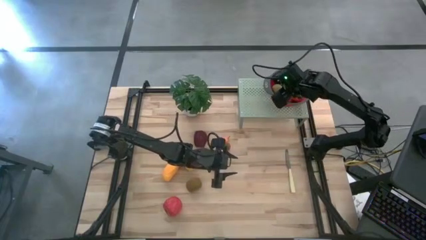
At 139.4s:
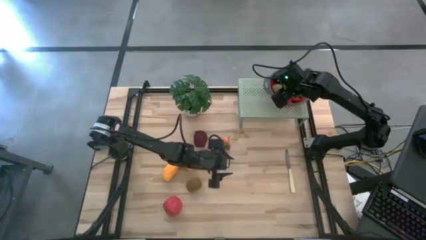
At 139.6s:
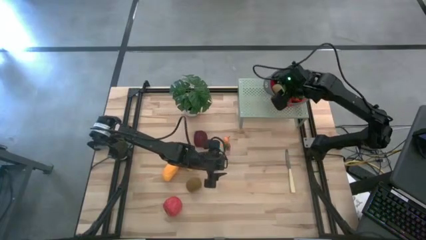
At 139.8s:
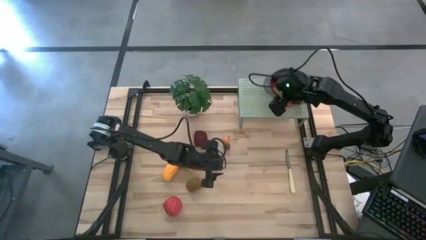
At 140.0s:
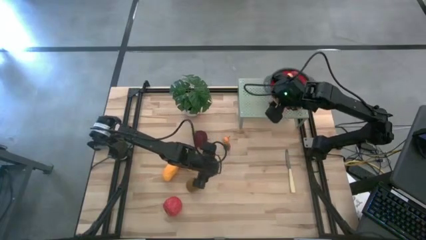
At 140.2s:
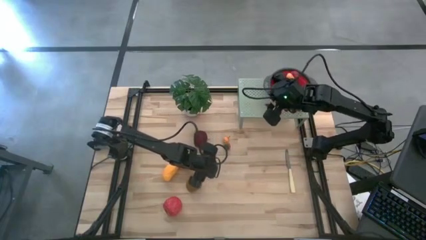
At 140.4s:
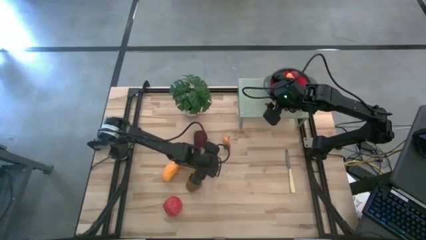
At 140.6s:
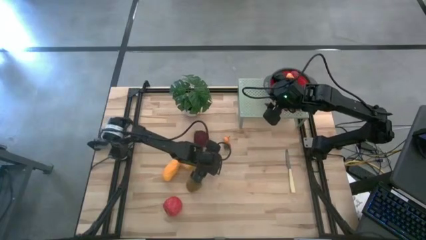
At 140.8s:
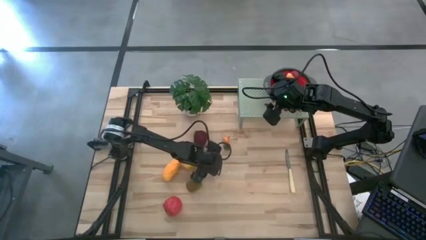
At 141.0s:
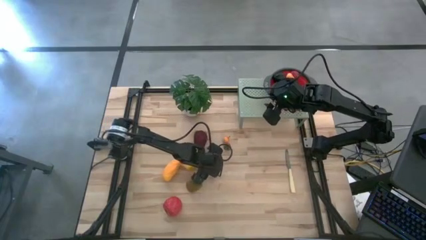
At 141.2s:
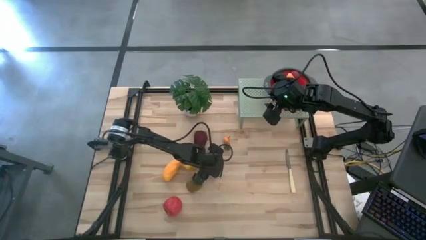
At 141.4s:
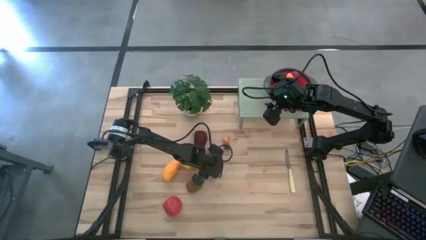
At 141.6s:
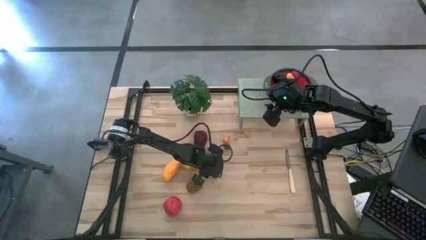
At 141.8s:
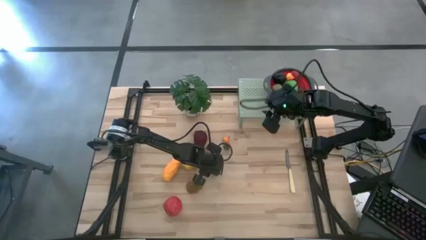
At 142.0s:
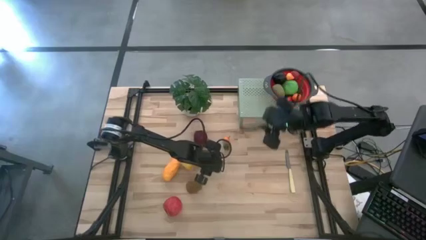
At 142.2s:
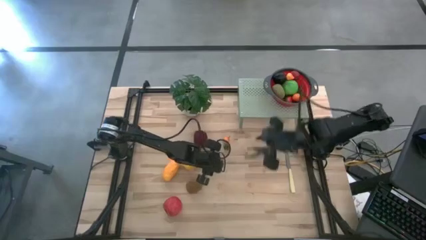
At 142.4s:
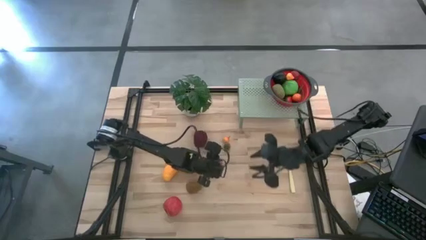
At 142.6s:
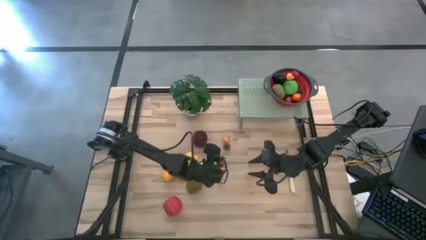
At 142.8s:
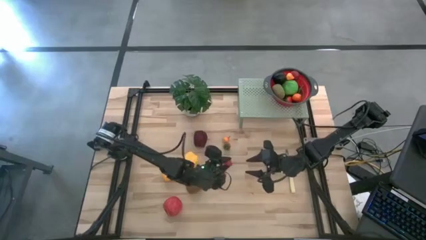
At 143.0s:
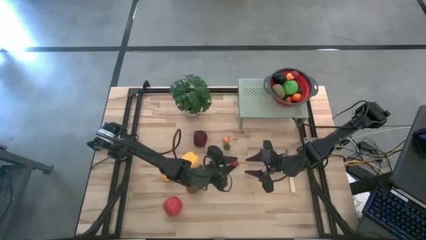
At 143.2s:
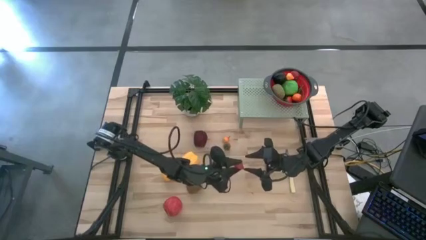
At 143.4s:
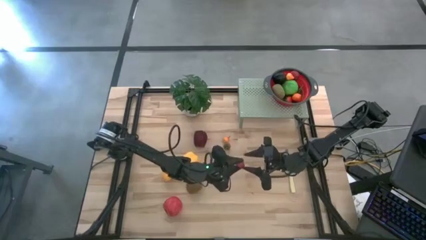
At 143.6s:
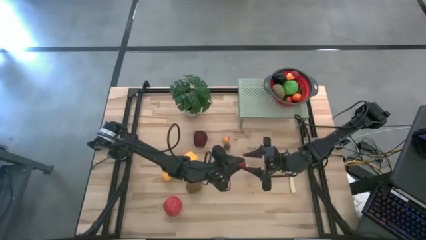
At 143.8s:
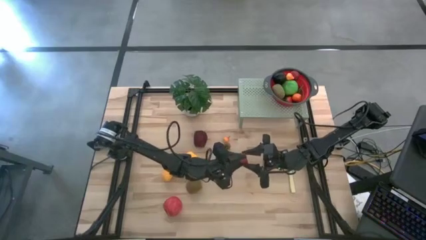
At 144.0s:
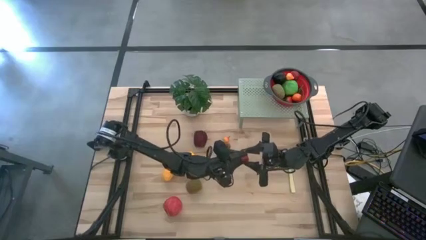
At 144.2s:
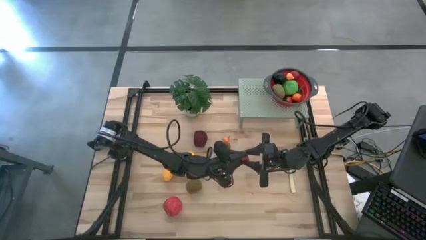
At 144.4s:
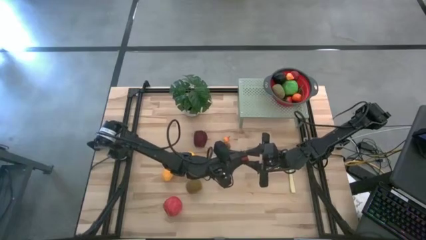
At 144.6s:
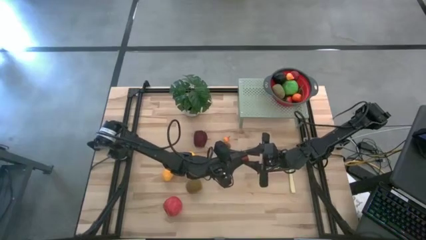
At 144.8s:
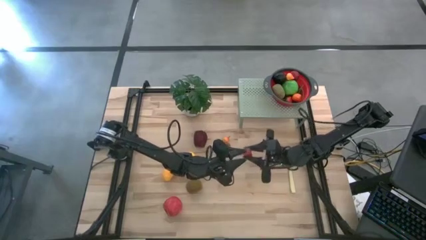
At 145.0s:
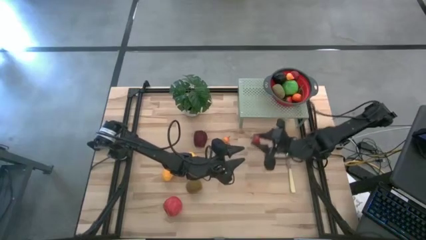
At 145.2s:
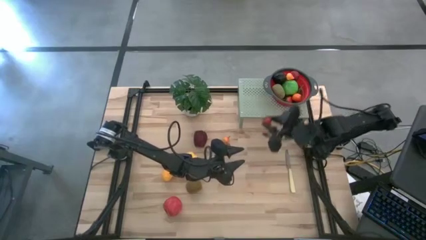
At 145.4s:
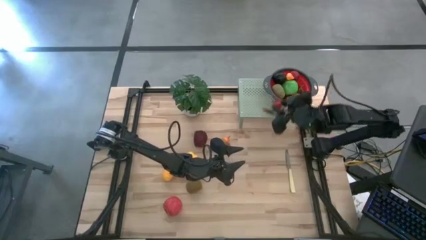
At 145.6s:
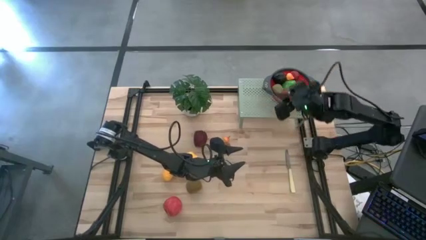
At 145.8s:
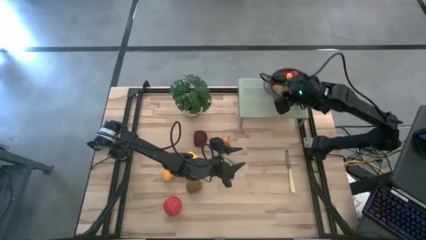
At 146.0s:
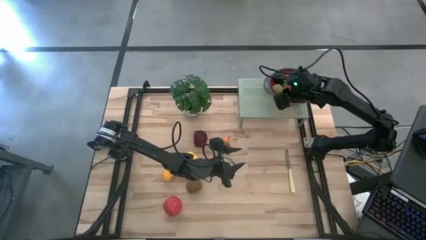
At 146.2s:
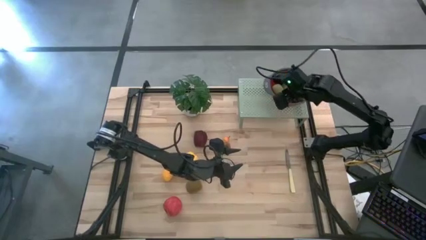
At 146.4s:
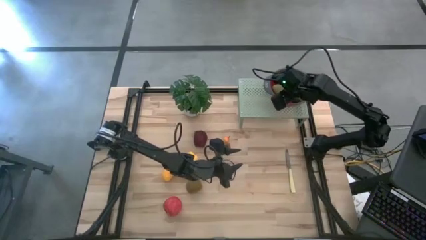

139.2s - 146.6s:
Task: Pick & Place Fruit
Put the red strawberry into the red strainer bowl on the shelf

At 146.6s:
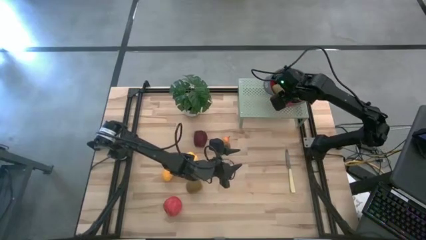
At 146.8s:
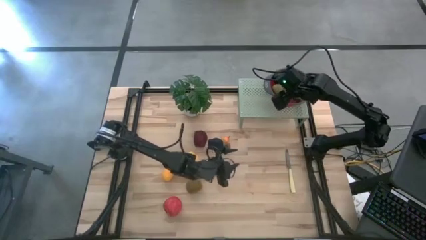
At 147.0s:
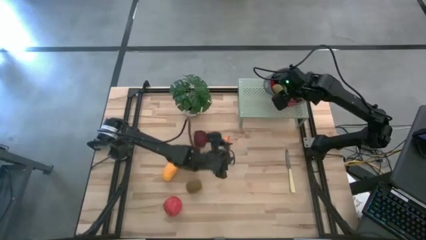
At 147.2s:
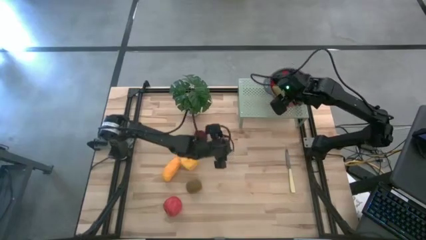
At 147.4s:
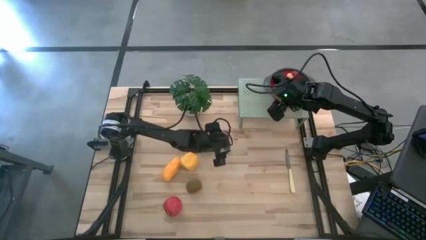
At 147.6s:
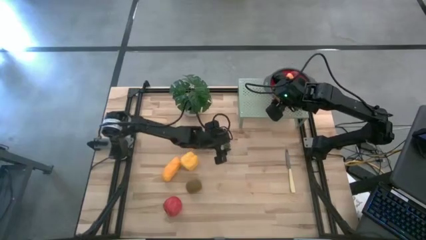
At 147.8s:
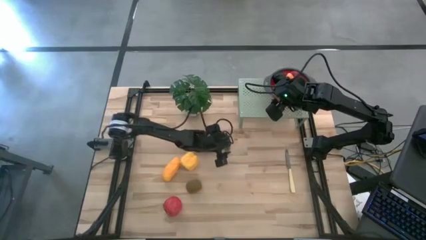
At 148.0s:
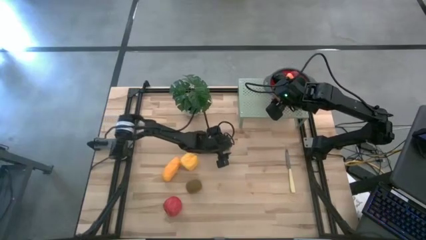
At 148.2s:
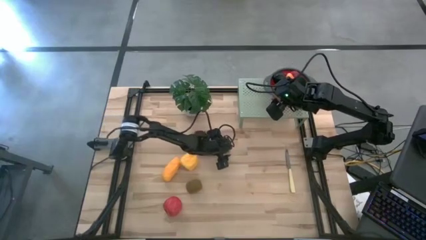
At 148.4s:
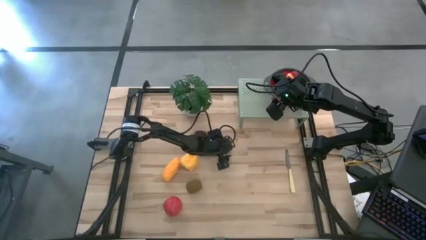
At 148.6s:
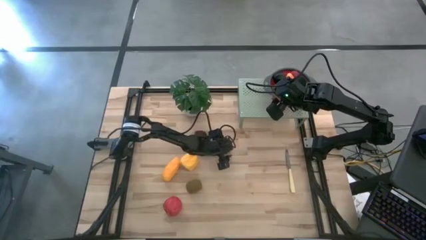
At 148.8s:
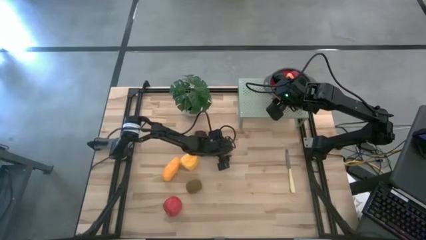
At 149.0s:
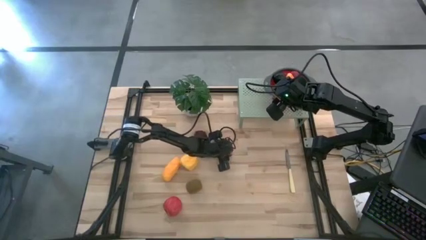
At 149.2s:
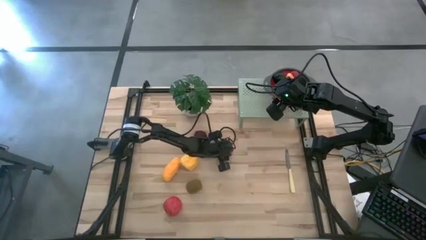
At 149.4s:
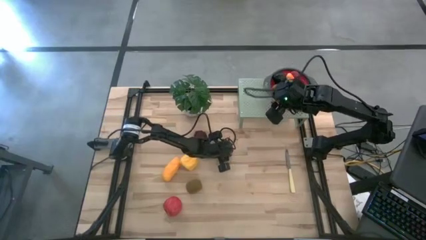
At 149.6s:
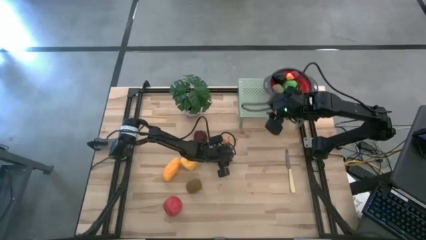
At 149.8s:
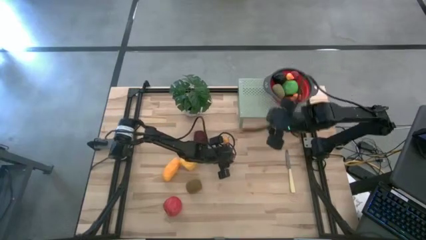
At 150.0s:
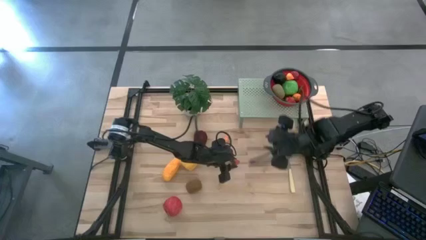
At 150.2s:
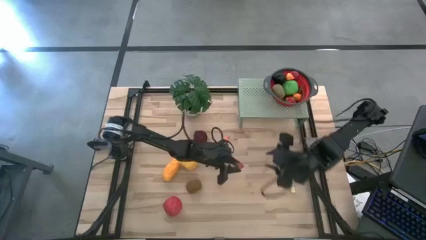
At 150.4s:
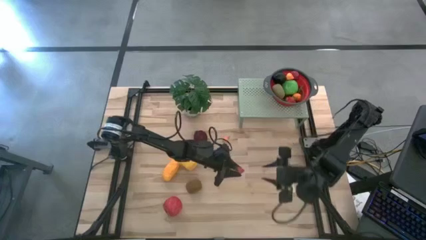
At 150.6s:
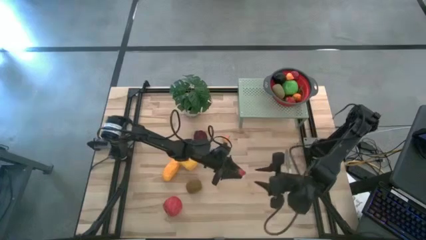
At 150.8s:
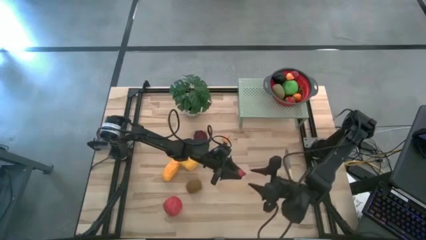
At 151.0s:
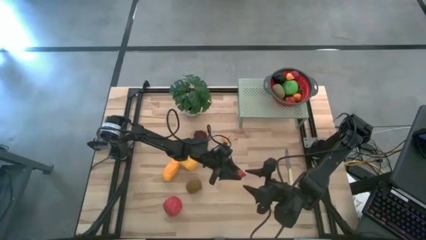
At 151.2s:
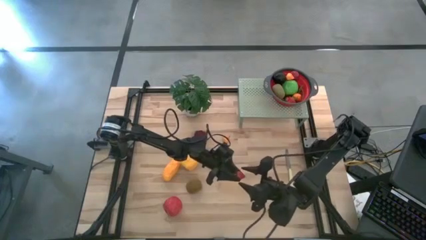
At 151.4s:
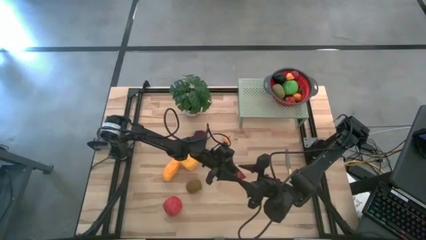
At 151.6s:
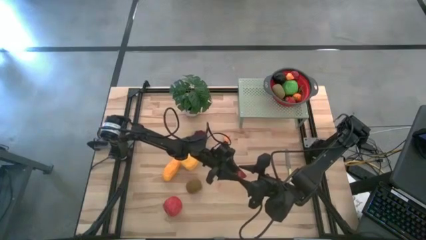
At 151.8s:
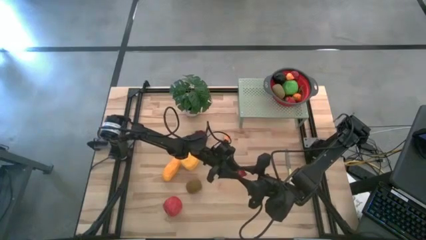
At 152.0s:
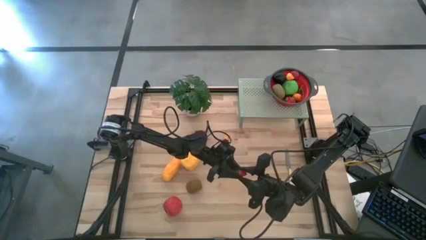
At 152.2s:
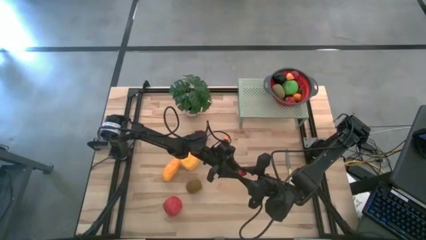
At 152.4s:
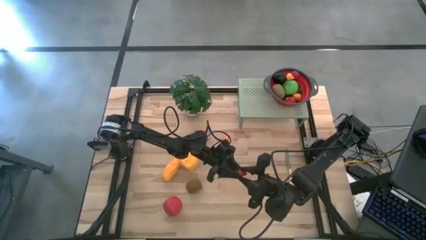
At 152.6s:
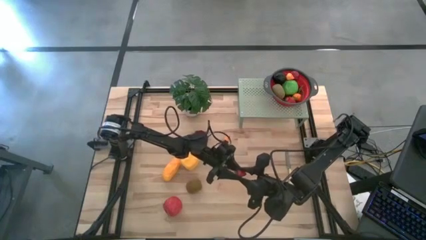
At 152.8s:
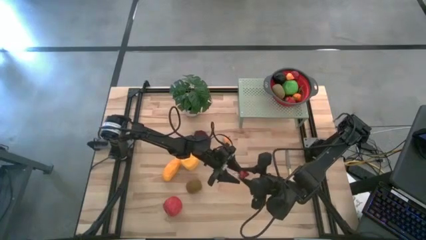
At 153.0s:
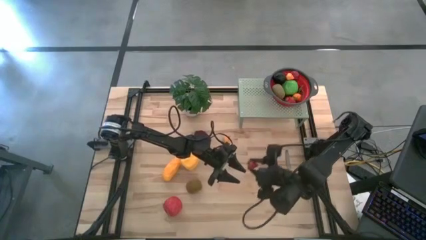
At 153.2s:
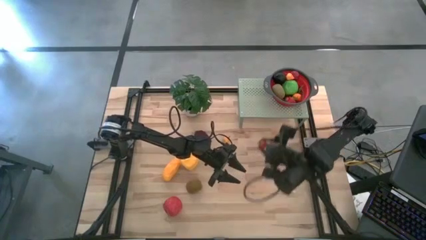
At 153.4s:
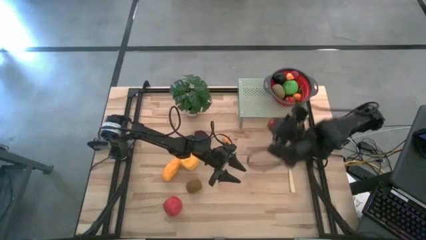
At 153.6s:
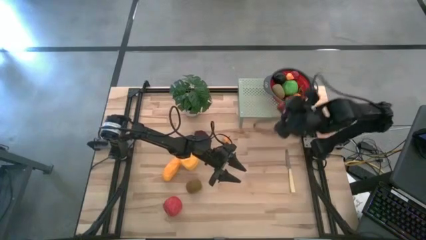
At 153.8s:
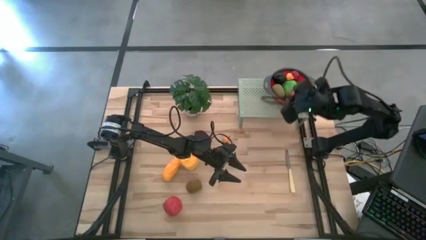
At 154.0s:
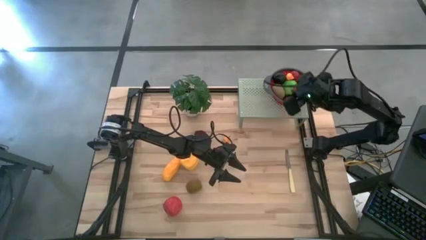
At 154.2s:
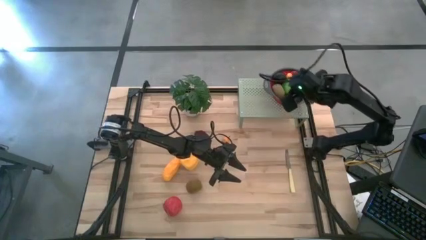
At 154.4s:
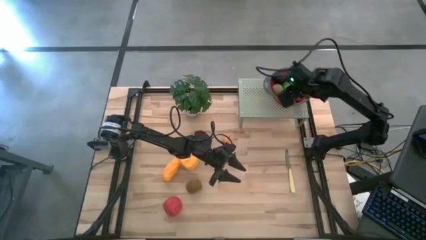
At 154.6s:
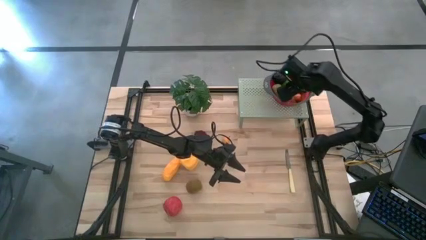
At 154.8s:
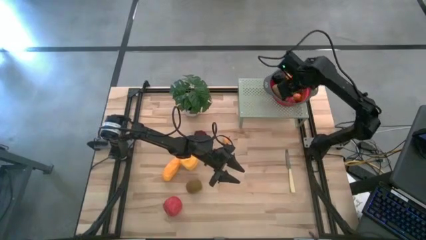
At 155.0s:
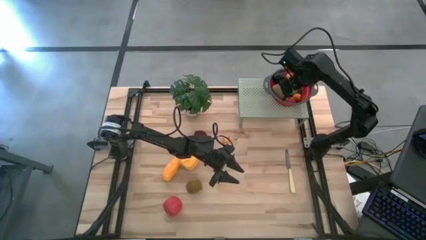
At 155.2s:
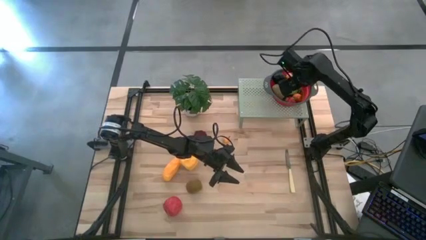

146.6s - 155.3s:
Put the red strawberry into the red strainer bowl on the shelf

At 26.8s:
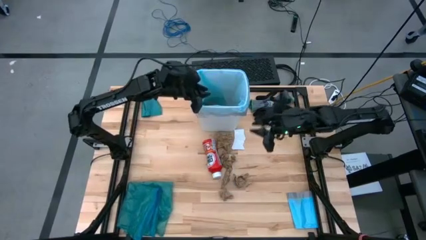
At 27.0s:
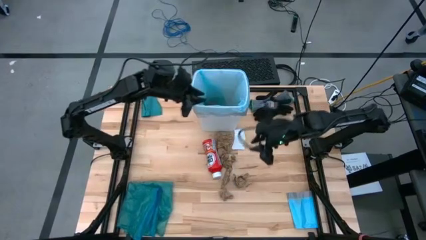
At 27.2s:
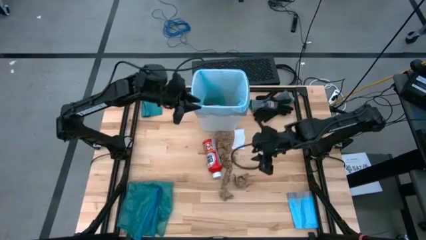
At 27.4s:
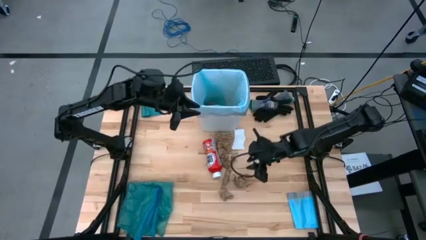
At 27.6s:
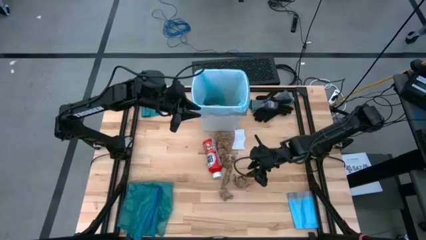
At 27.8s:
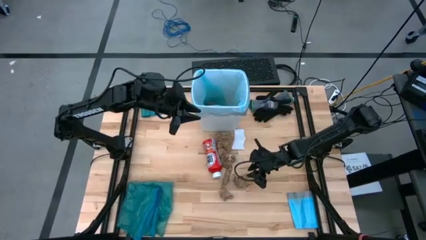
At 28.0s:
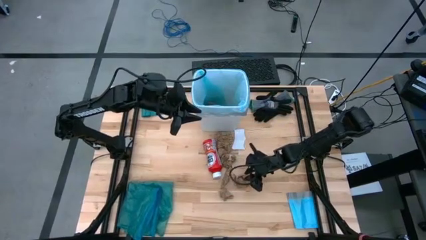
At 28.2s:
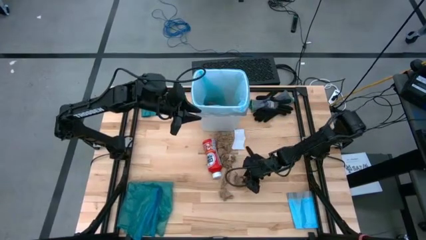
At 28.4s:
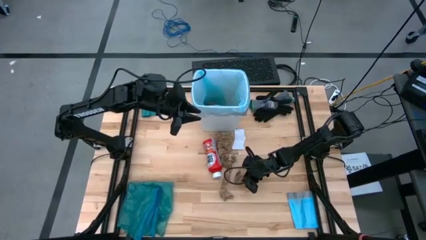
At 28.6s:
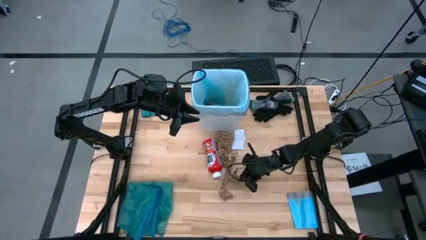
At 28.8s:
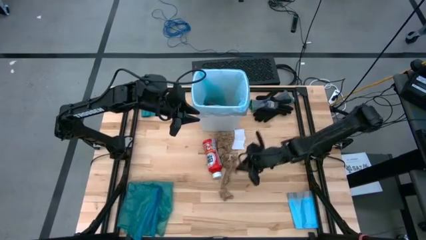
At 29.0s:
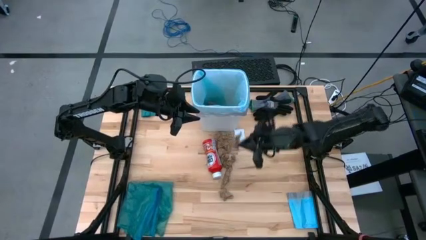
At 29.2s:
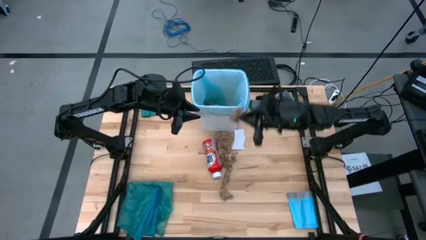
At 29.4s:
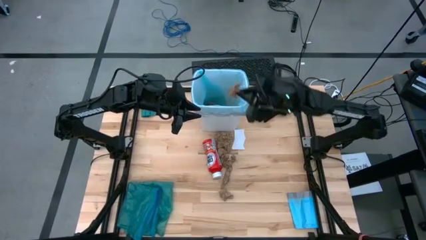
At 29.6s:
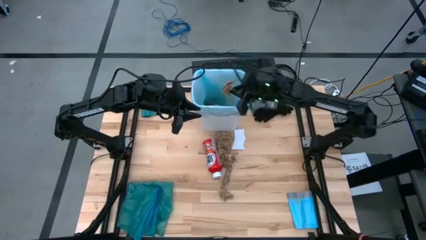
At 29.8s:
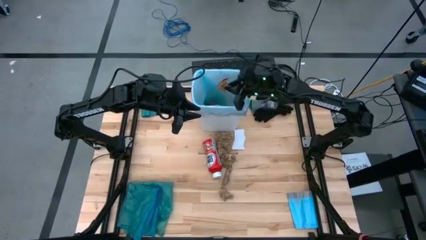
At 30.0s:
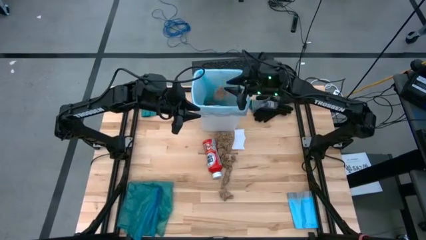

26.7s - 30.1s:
Task: place trash/remove bag and relplace
Put the brown paper into the white trash bin
